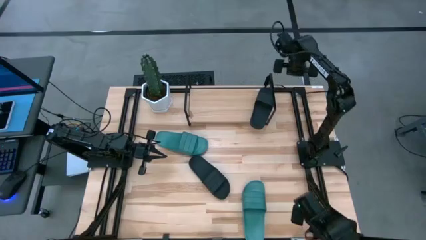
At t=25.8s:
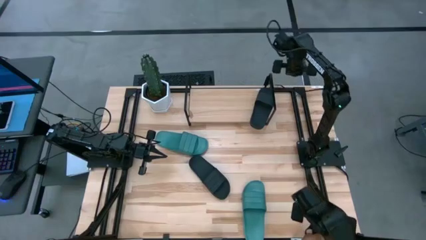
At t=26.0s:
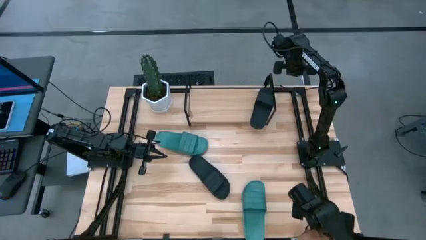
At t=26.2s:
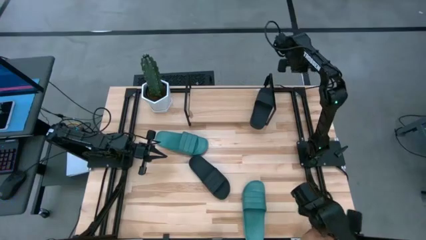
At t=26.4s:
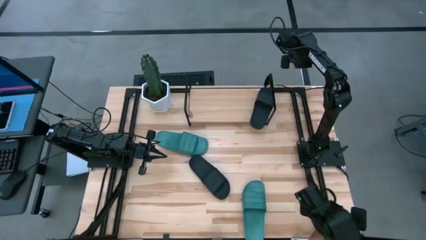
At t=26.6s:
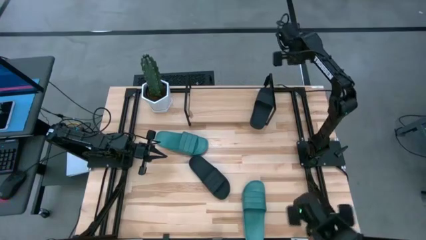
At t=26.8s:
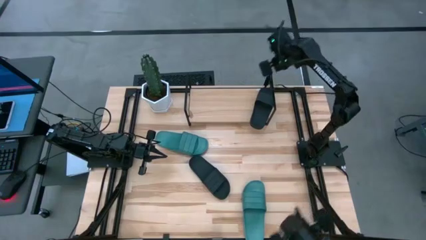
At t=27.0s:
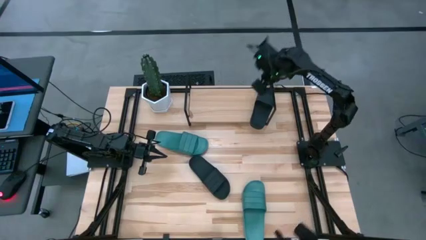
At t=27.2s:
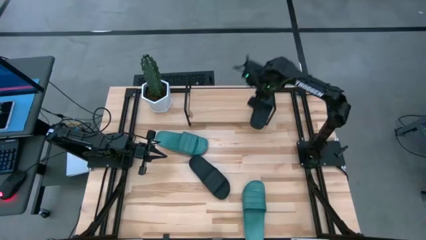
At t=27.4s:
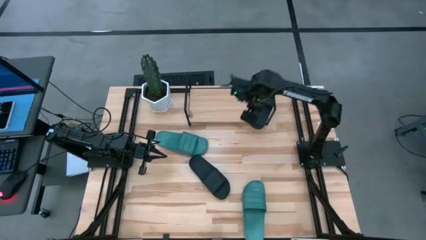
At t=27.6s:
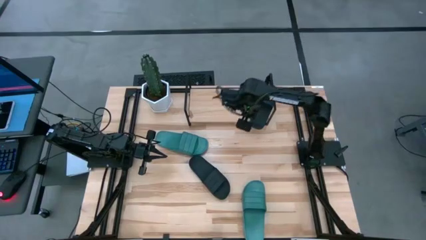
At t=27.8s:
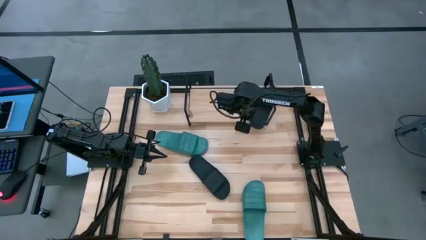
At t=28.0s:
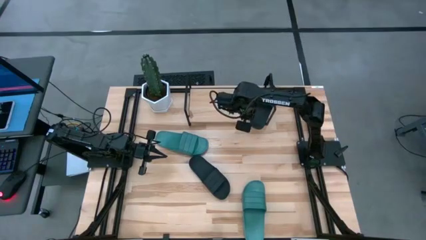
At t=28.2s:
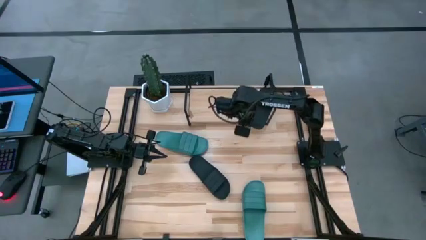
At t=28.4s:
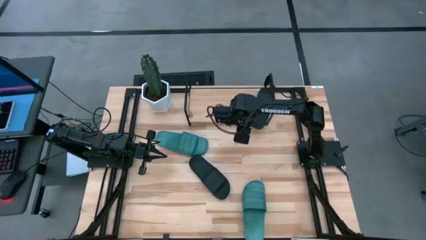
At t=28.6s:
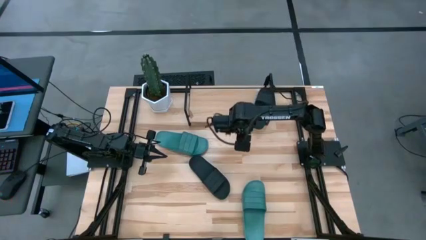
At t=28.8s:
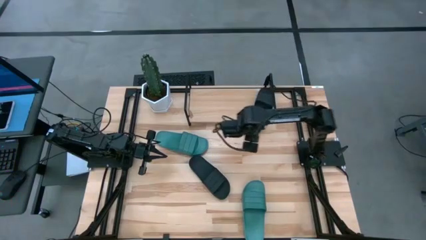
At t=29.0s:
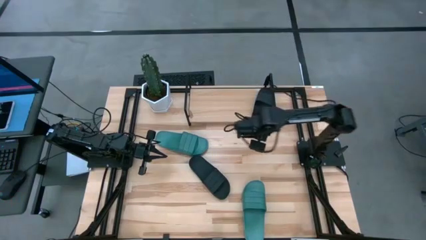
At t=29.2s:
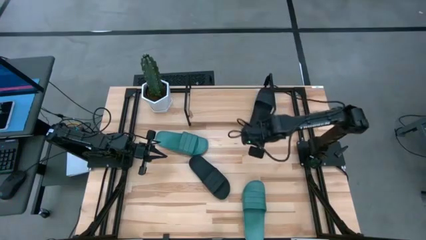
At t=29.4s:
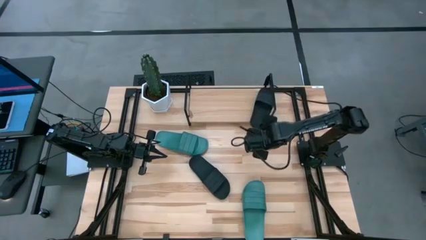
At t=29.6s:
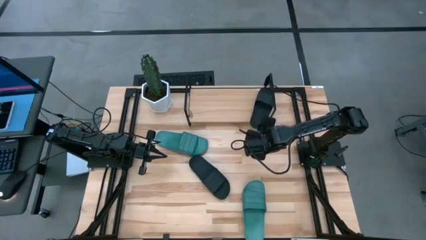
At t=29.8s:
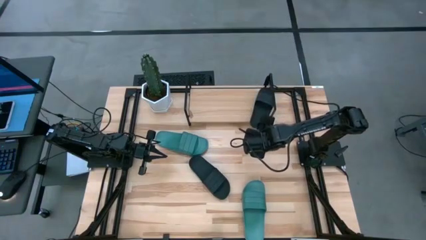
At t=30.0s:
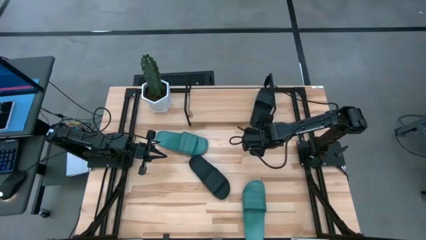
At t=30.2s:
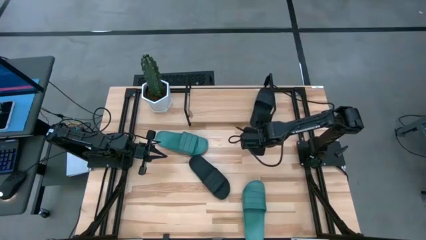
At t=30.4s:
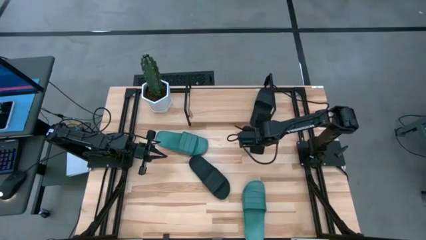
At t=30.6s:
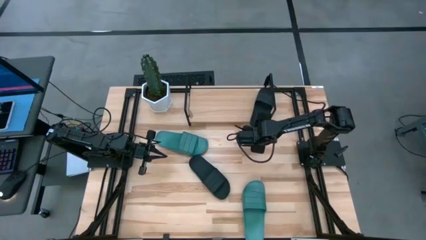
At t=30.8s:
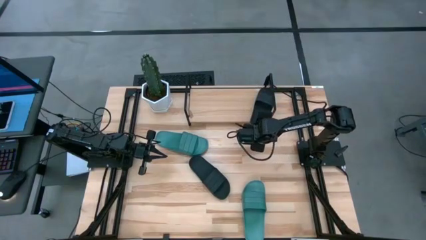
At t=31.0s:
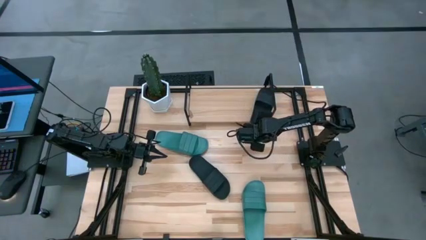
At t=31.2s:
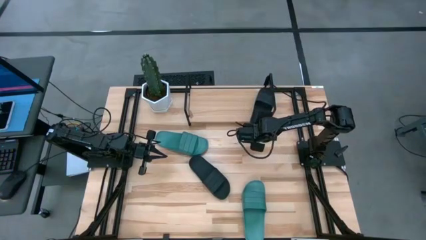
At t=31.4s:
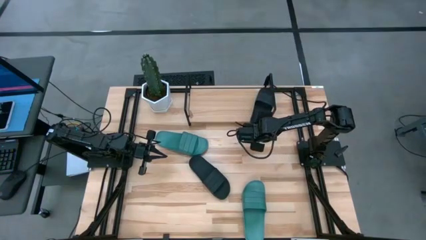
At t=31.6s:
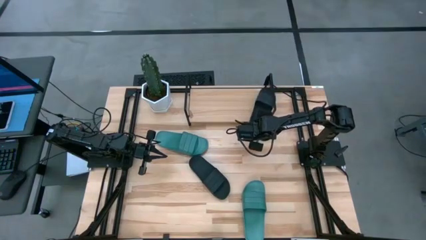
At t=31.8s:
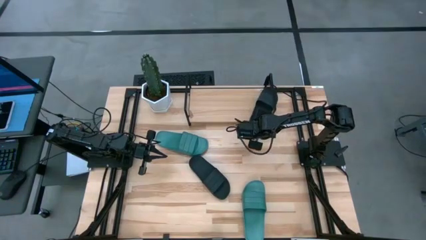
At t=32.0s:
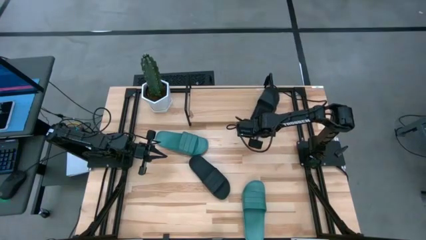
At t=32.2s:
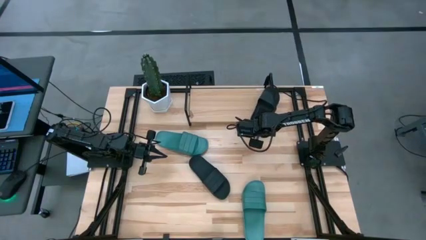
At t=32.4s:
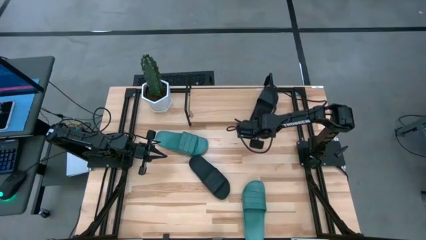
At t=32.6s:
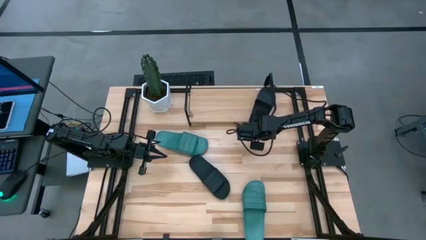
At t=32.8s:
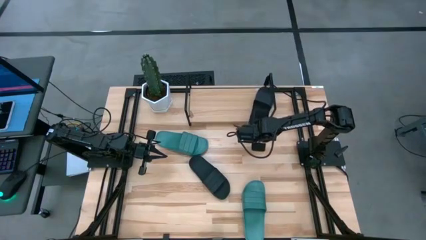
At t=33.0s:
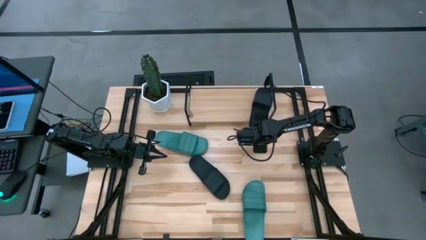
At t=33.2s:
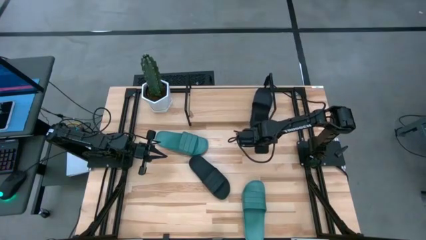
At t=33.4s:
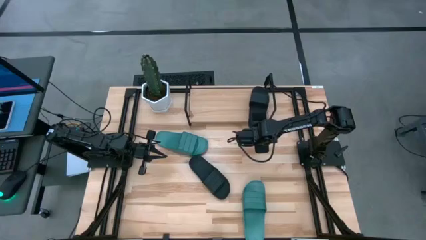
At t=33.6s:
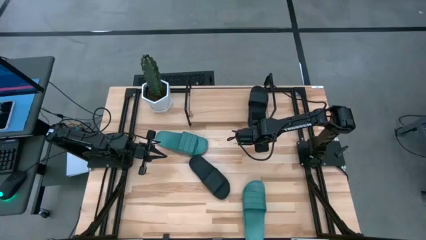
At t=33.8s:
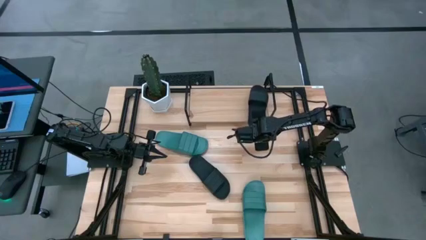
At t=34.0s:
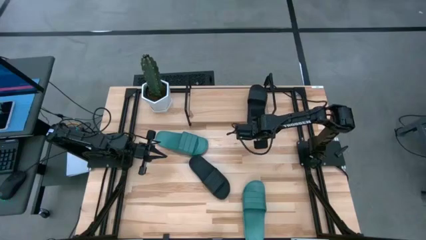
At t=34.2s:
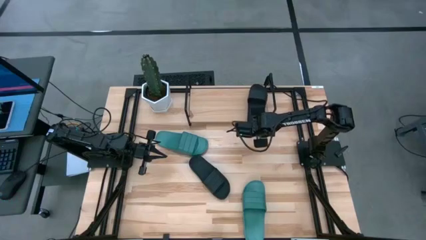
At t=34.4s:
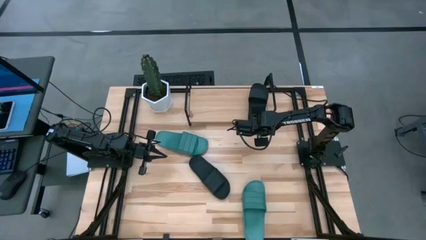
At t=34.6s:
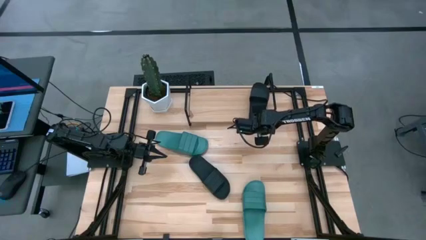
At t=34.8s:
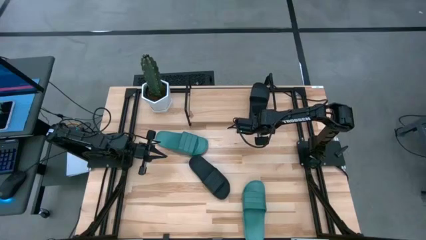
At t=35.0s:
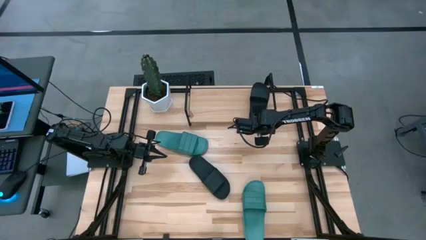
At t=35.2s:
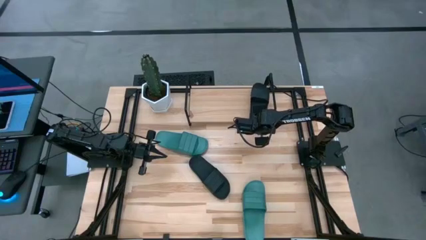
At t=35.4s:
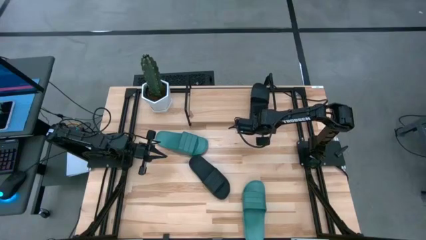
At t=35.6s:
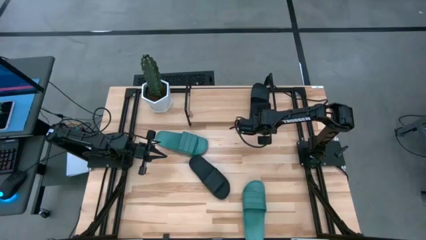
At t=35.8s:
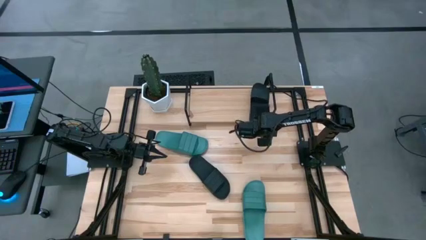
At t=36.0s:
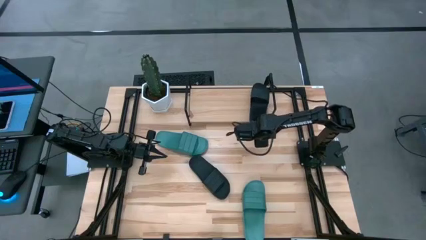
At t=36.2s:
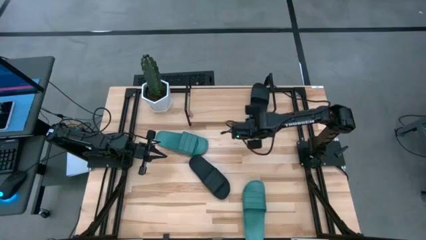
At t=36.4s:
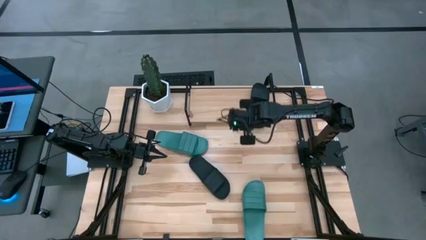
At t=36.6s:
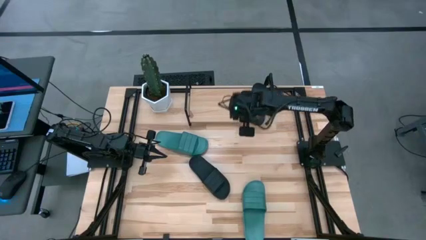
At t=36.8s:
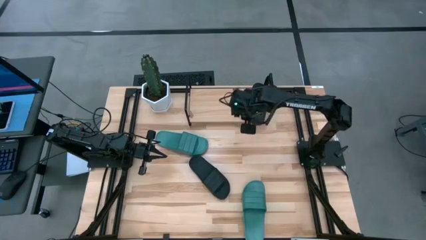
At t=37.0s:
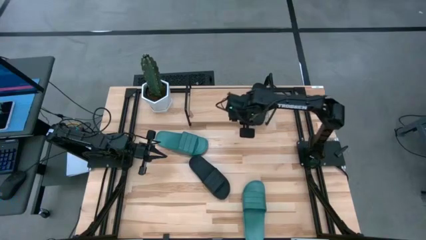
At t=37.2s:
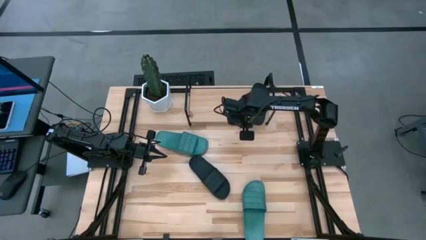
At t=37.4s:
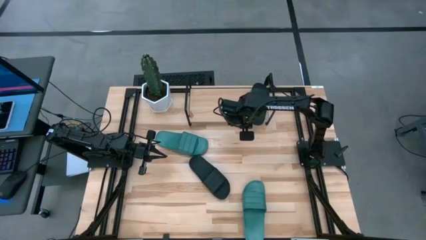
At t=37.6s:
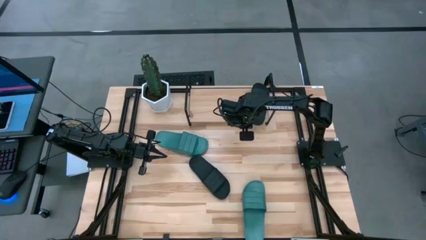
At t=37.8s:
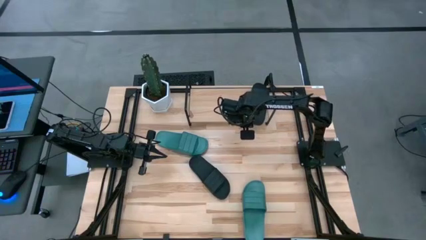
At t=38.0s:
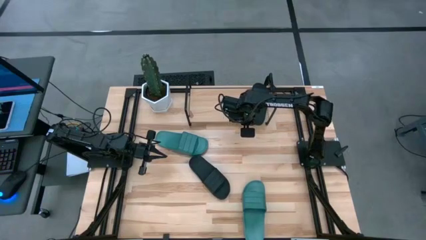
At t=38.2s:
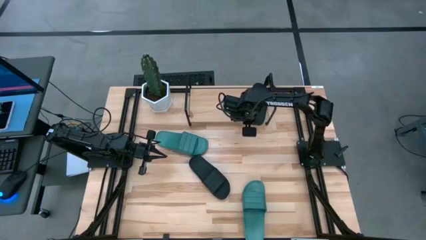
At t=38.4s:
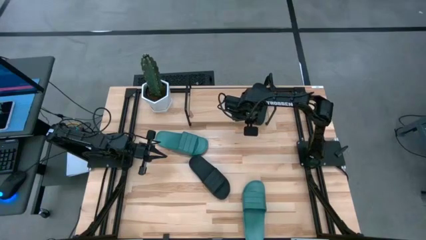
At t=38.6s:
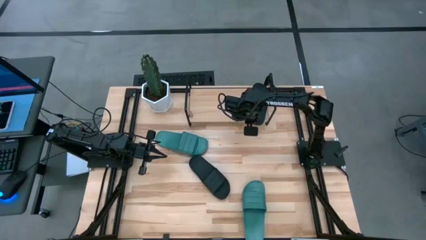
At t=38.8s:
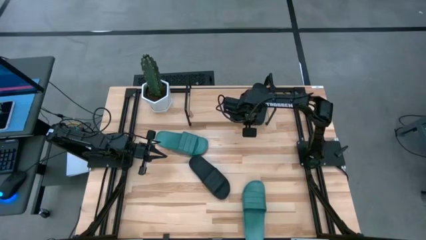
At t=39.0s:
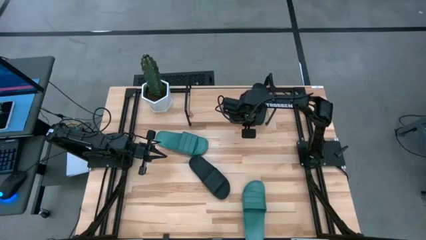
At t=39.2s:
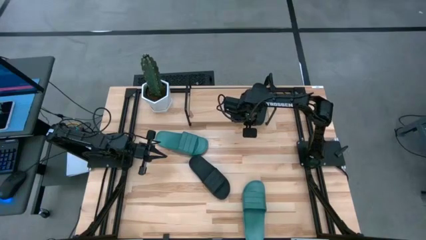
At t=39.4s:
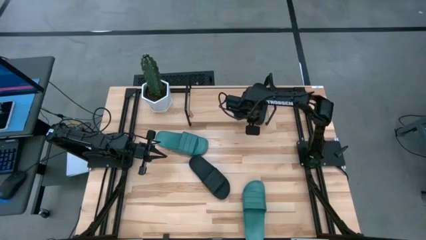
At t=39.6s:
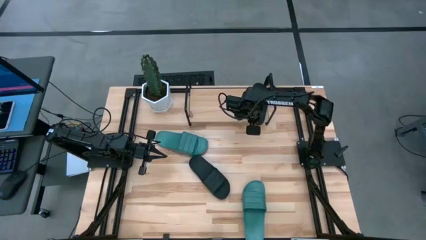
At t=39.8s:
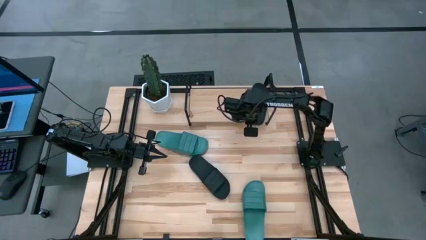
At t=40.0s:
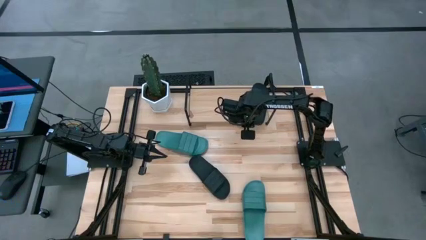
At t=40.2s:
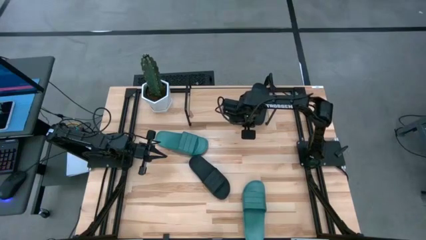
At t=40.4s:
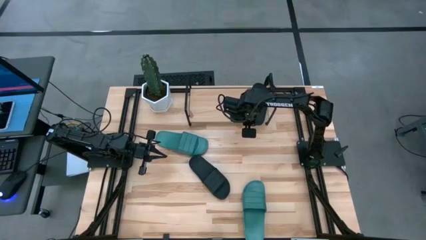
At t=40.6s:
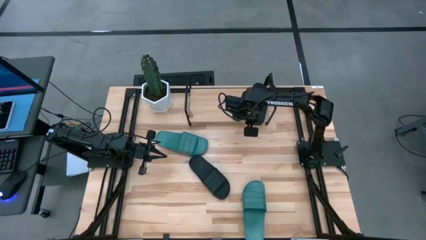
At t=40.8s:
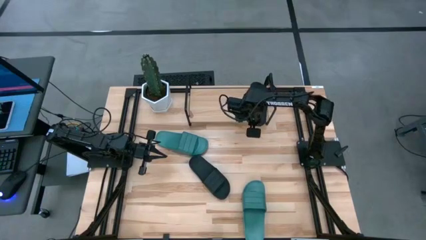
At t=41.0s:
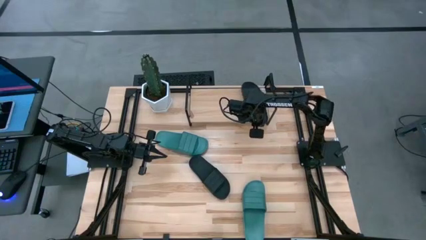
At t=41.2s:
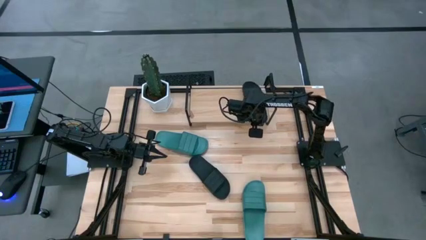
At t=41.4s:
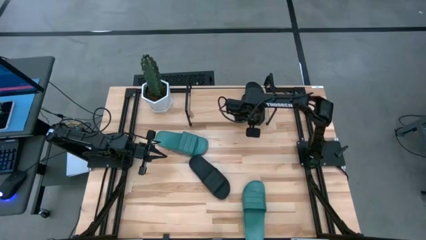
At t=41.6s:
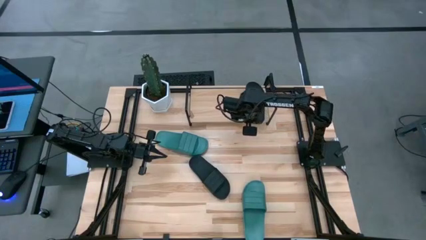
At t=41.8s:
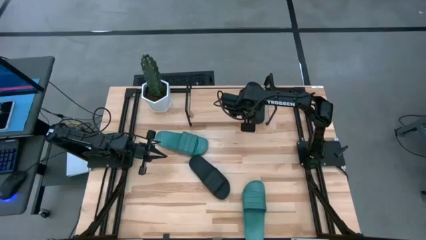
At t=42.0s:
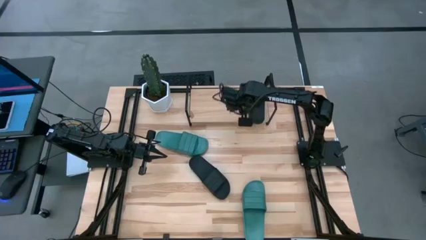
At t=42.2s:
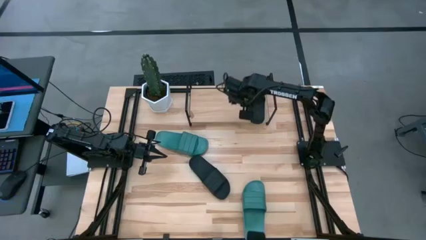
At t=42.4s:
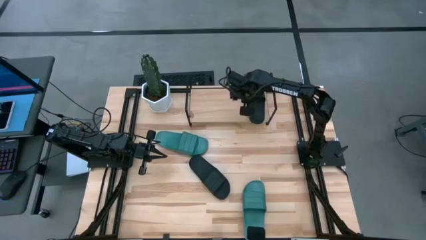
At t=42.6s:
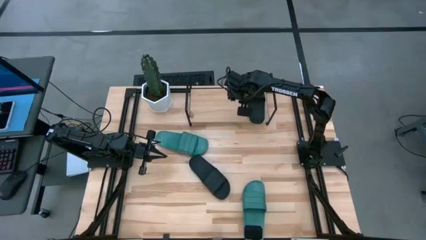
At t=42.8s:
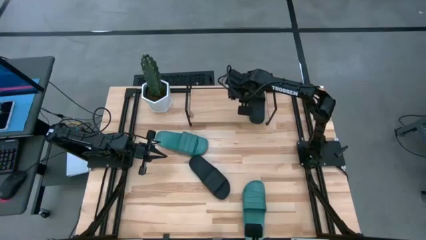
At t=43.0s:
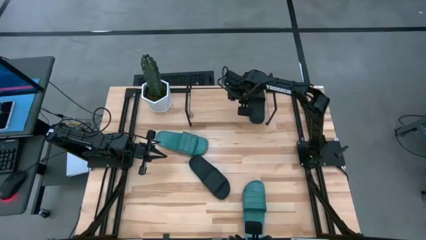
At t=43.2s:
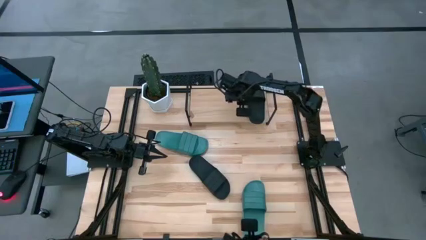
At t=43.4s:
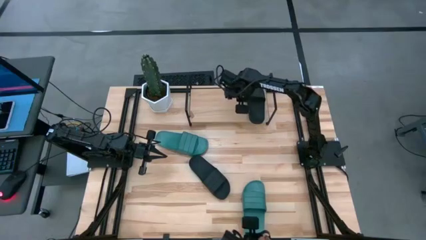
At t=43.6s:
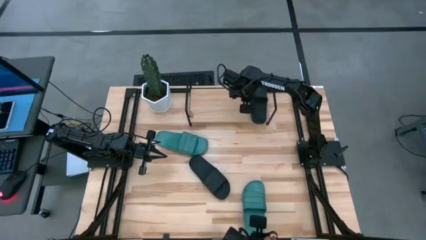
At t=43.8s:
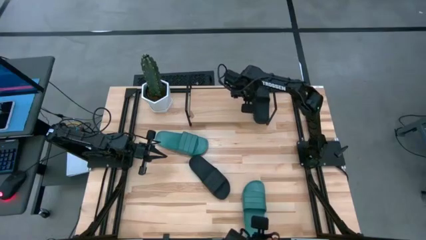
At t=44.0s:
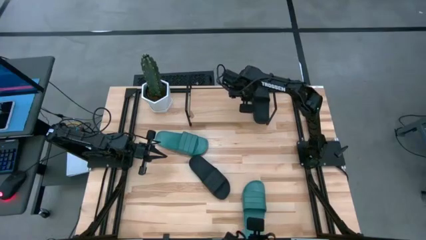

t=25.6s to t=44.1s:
Task: Pick and place slides into the shelf
Put the right black slide on the shelf
